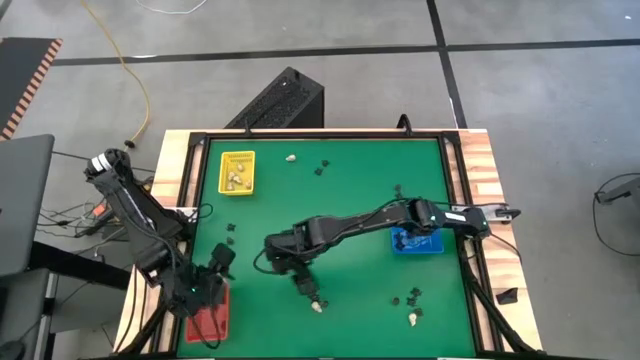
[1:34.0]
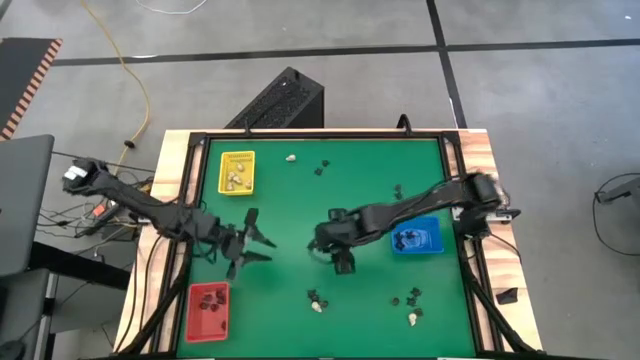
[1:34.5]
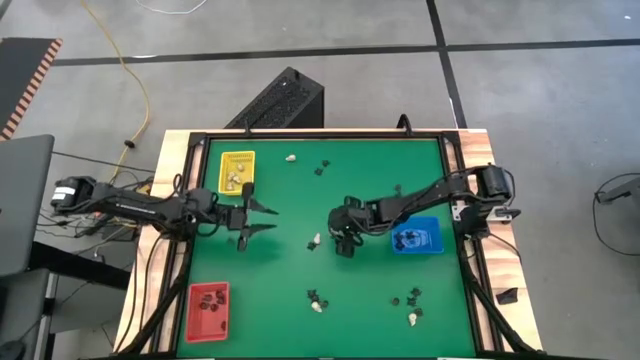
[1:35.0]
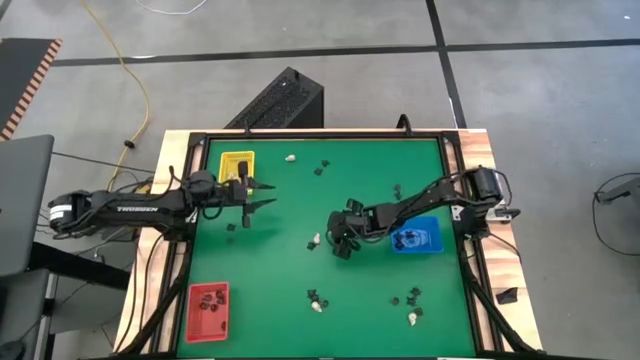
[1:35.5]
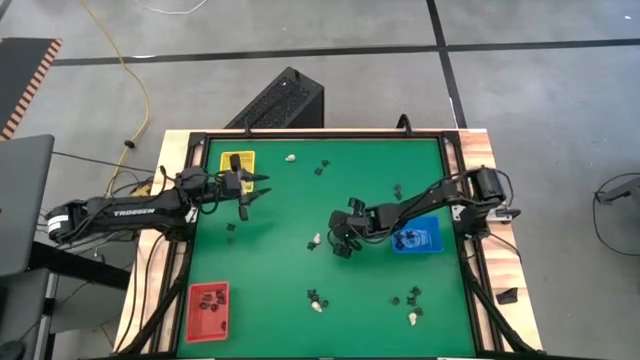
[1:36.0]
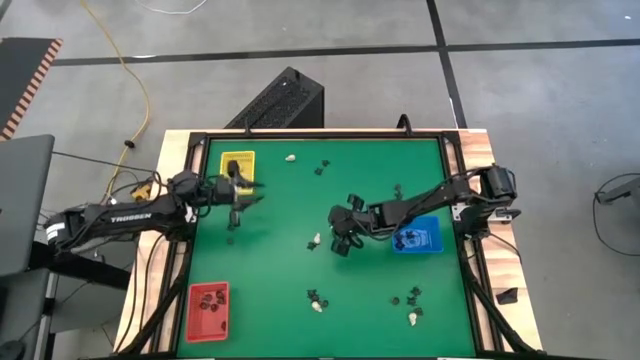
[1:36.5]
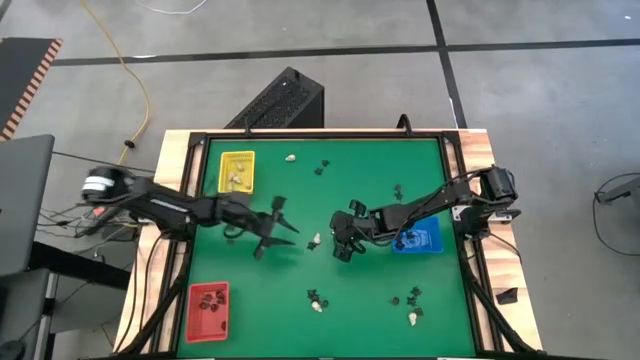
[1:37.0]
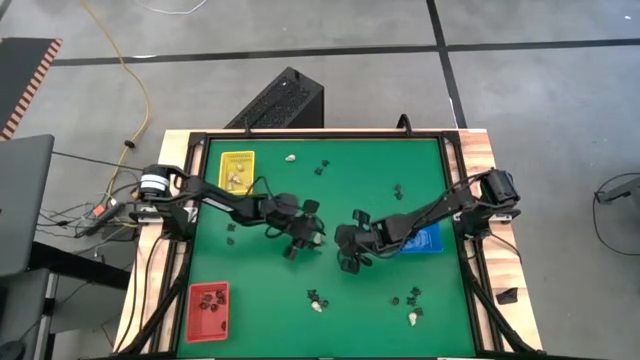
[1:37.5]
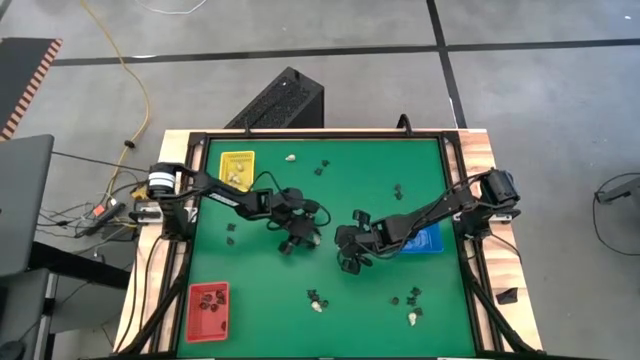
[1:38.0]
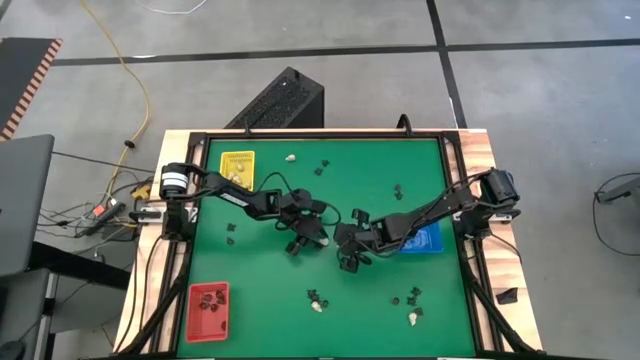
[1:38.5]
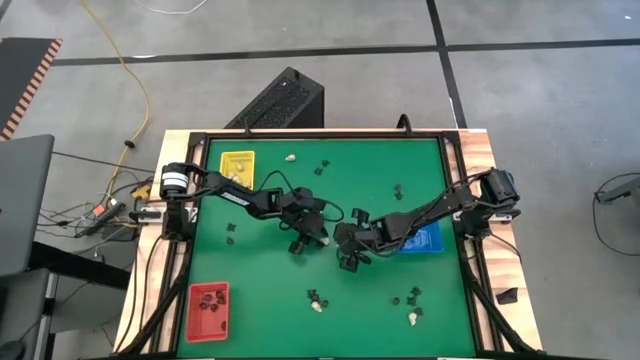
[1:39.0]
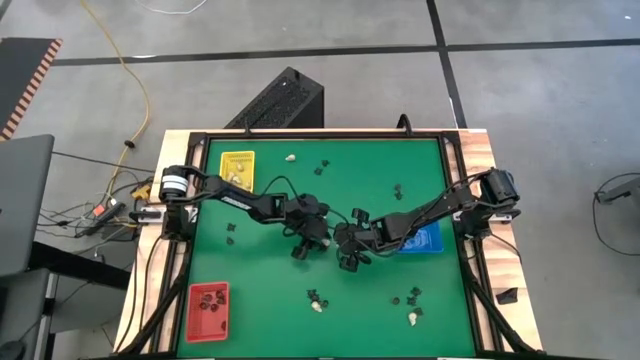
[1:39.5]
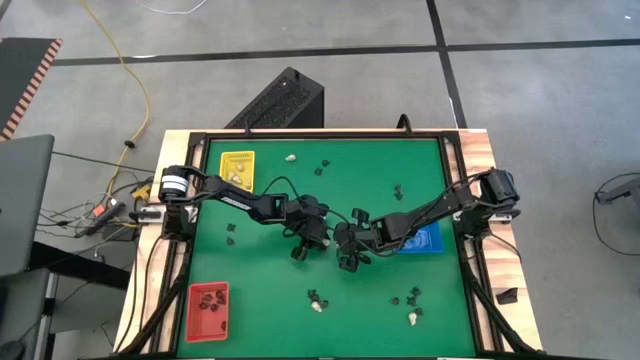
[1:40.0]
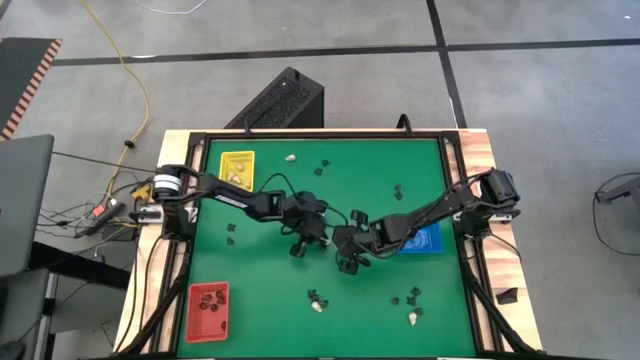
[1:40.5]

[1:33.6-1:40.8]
Task: Sort Halloween decoration
Put the white skull toy into the yellow bin

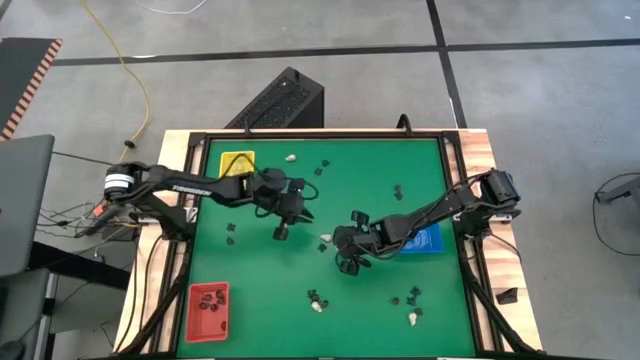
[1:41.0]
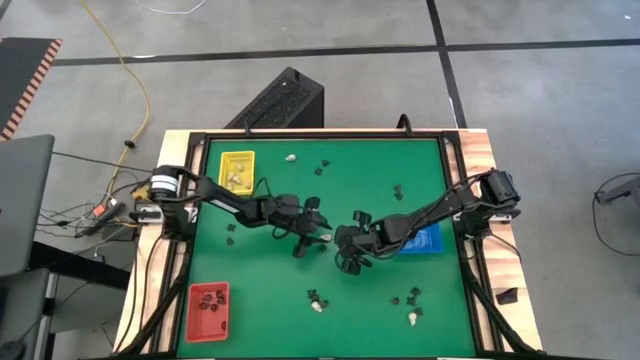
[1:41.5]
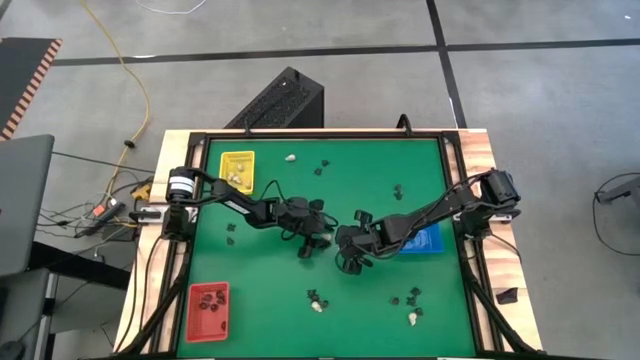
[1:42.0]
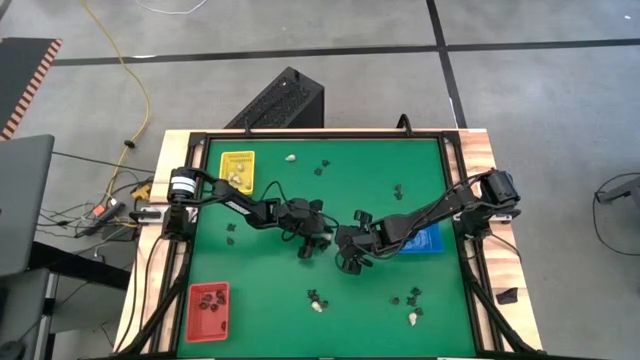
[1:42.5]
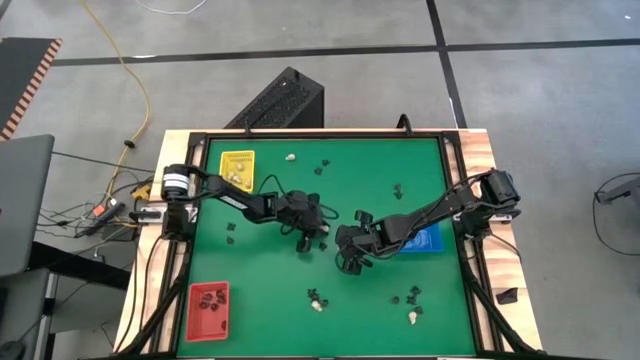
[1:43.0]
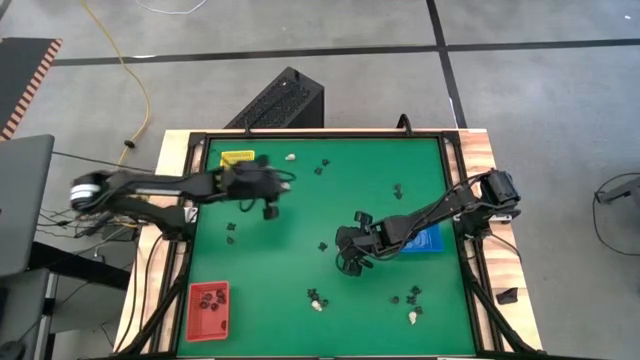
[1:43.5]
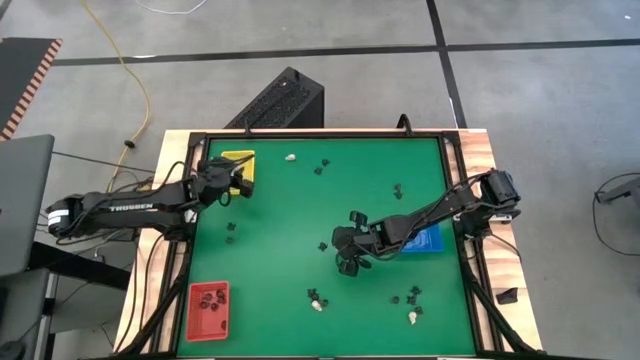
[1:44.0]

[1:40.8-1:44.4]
Put the white skull toy into the yellow bin

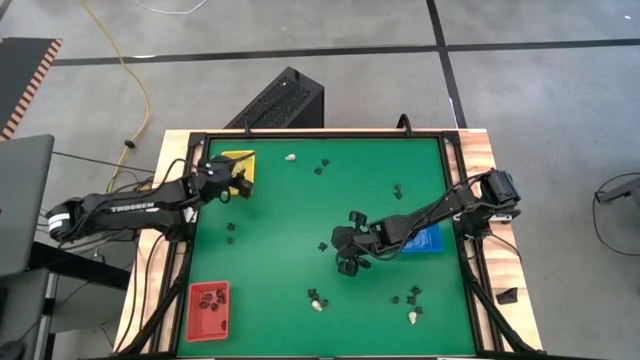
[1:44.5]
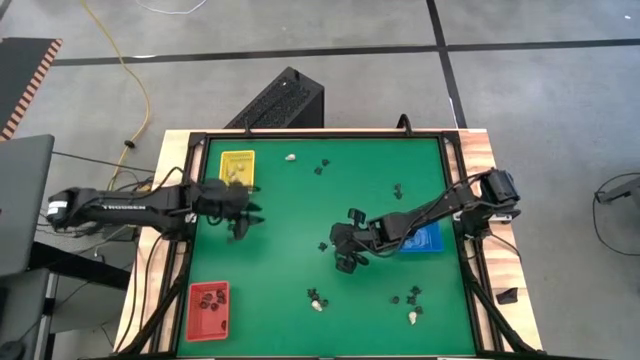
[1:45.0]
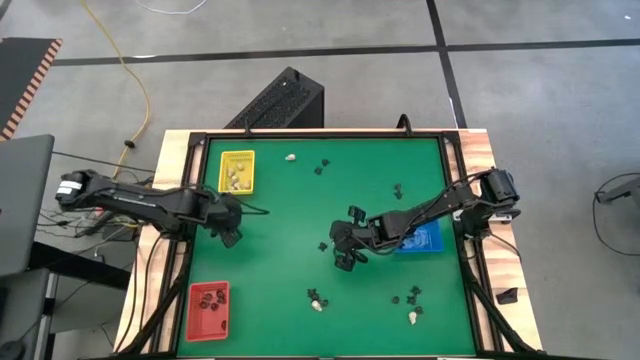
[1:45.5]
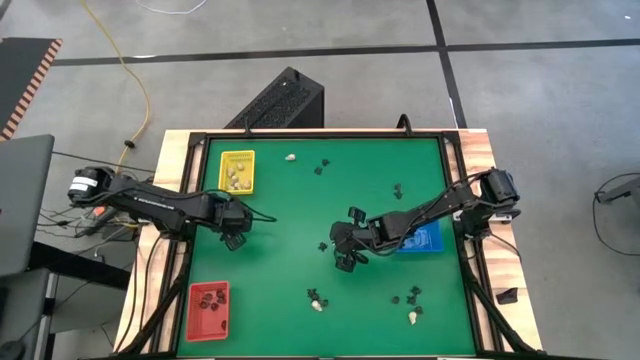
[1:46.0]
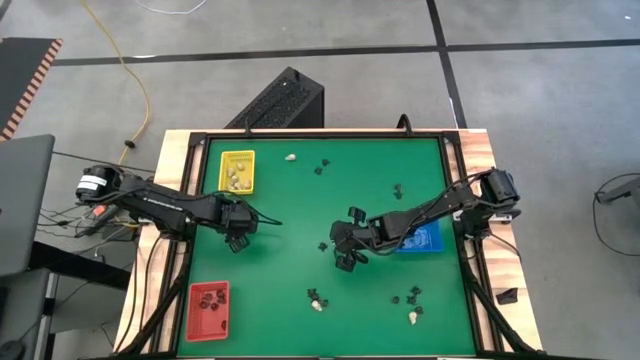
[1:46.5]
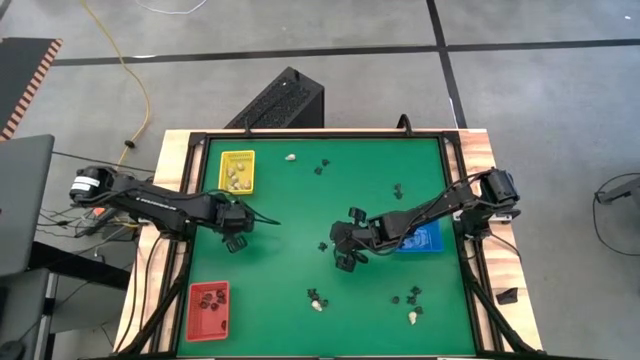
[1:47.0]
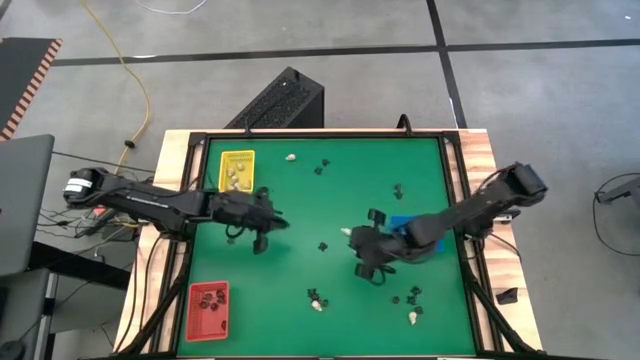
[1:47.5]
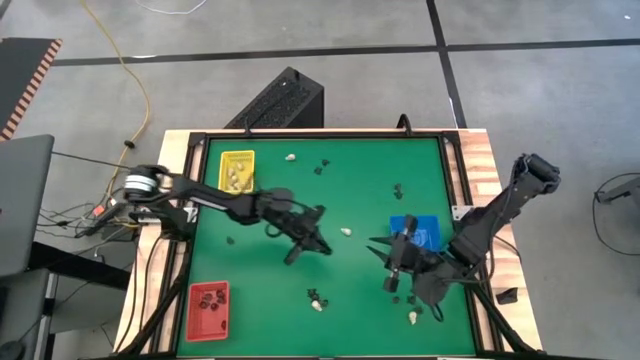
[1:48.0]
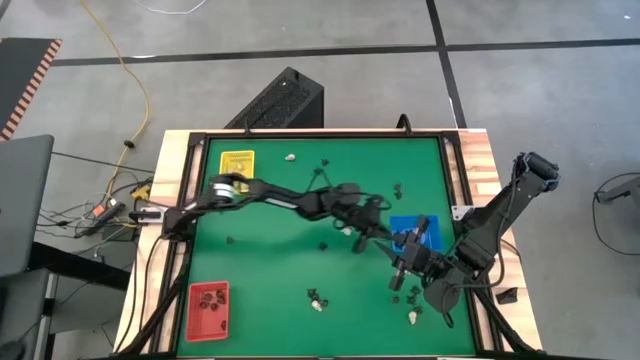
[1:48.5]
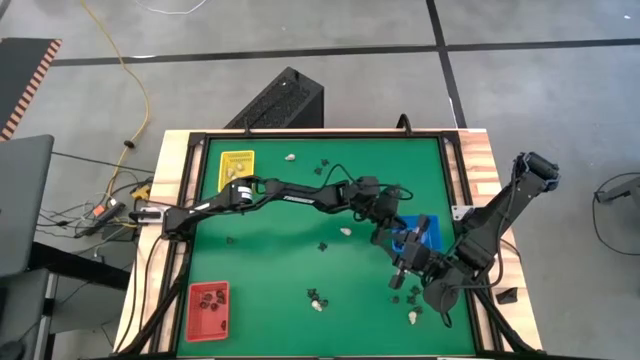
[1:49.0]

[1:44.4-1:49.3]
Put the black spider toy into the blue bin

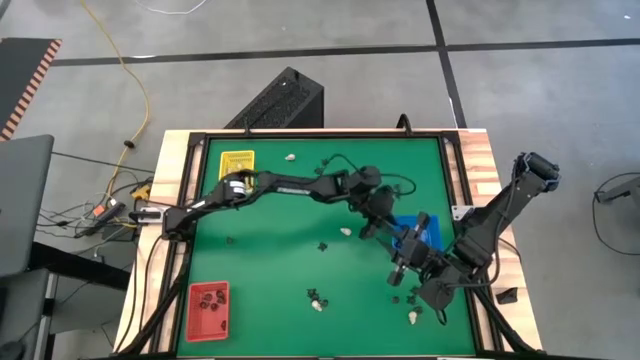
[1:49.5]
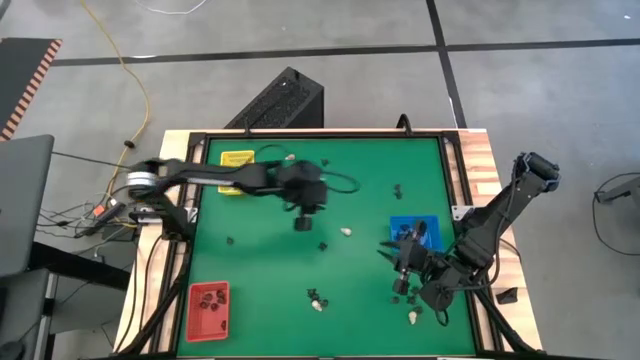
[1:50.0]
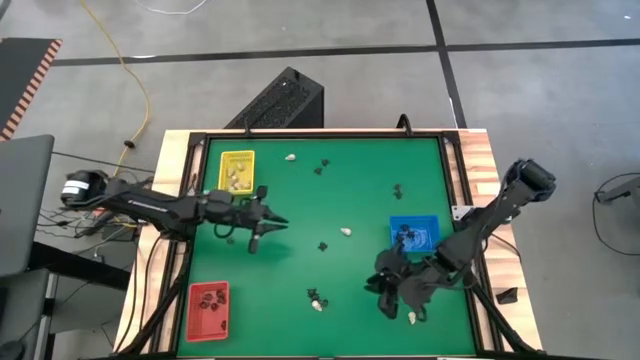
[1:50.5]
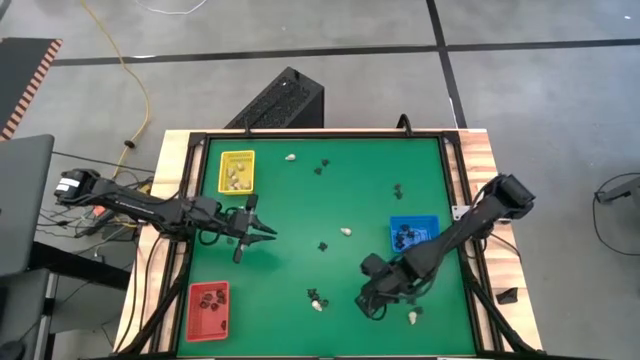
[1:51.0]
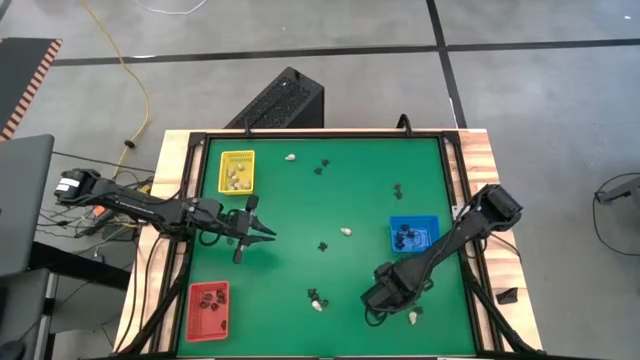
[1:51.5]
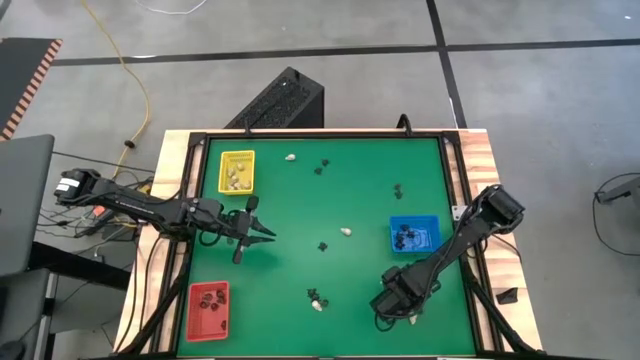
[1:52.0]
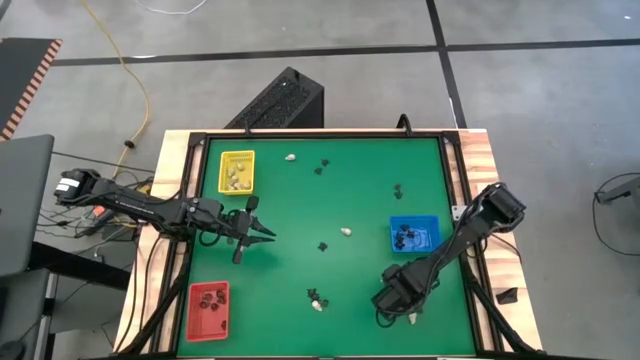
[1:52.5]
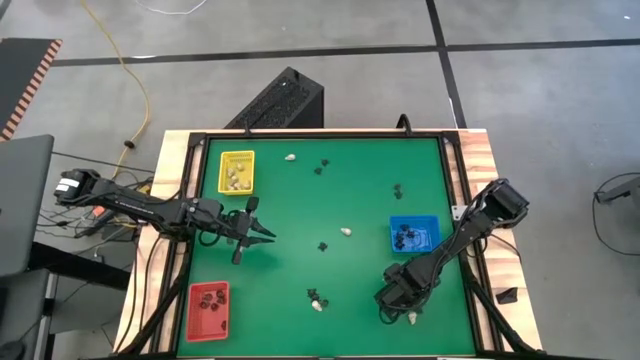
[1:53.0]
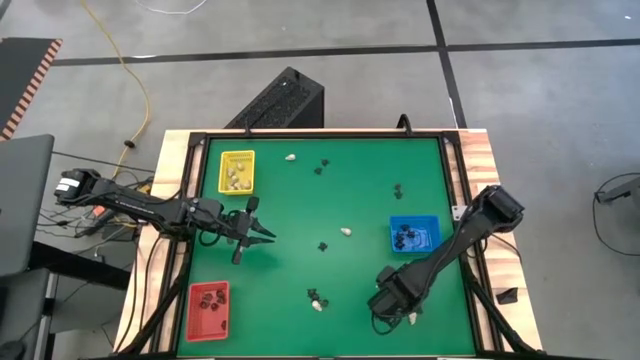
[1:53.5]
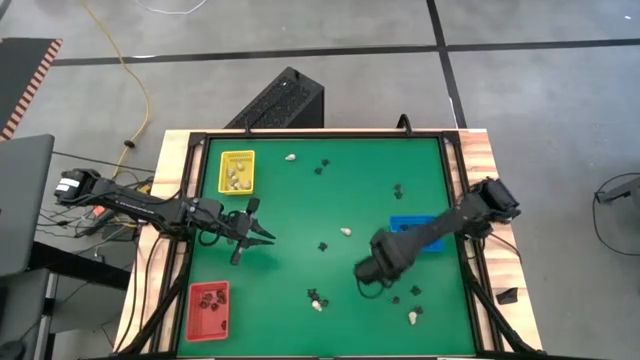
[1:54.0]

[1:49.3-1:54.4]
Put the black spider toy into the blue bin
